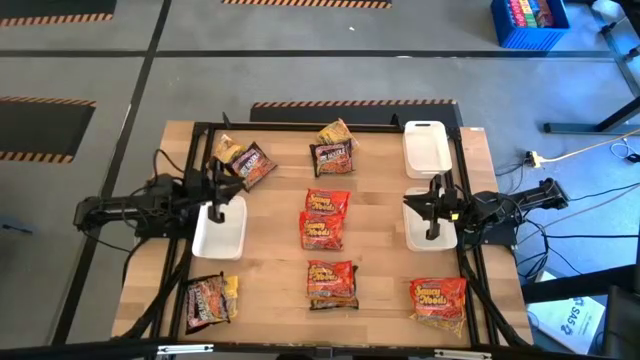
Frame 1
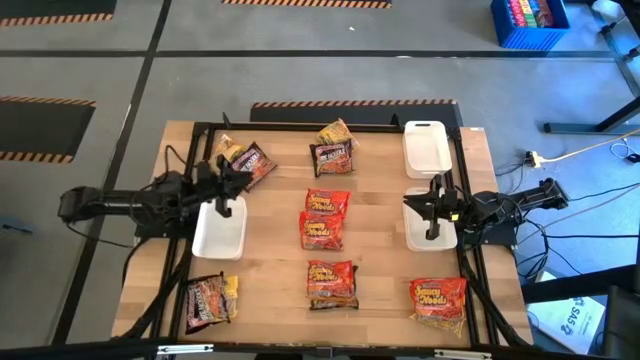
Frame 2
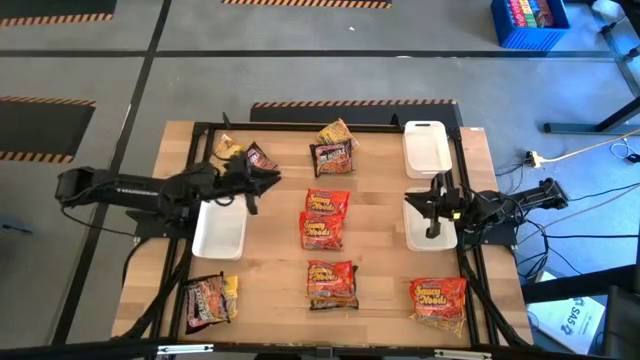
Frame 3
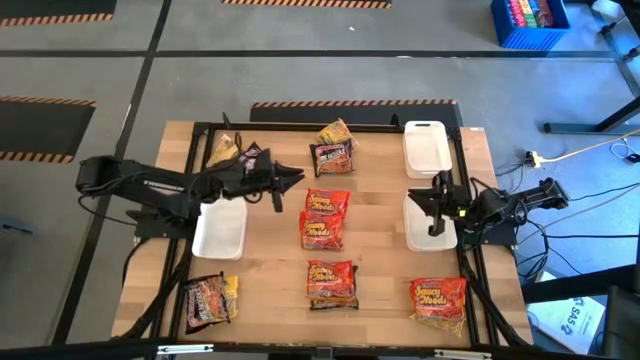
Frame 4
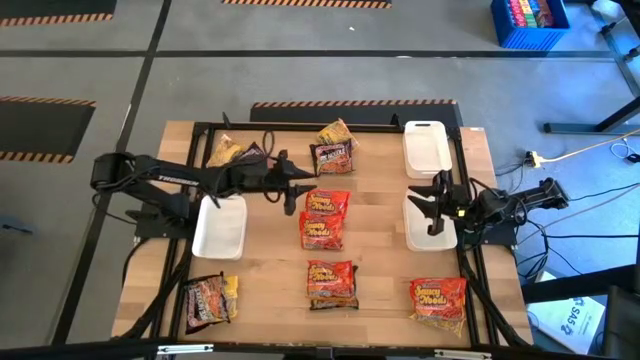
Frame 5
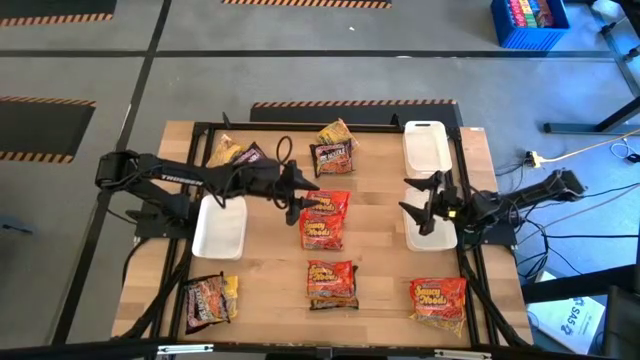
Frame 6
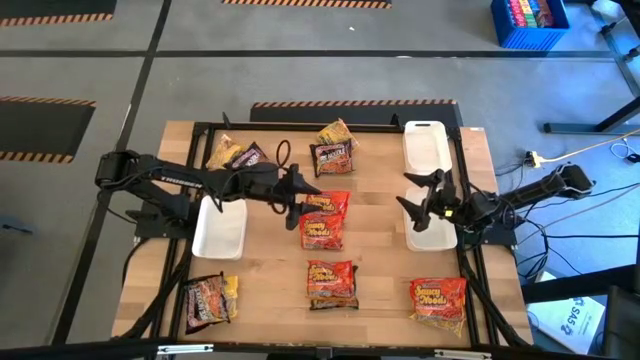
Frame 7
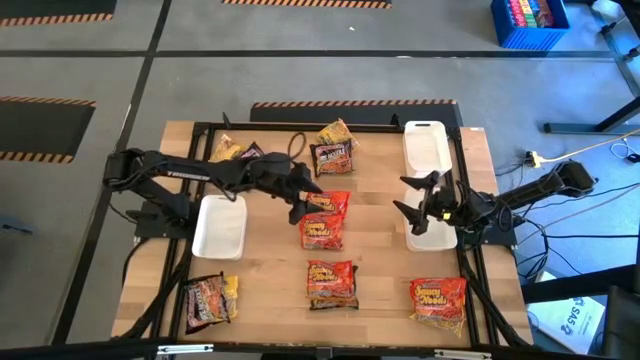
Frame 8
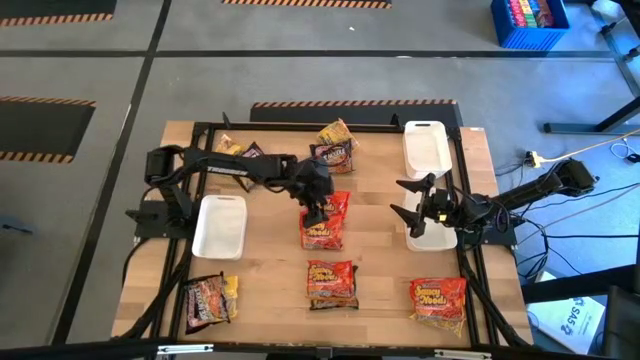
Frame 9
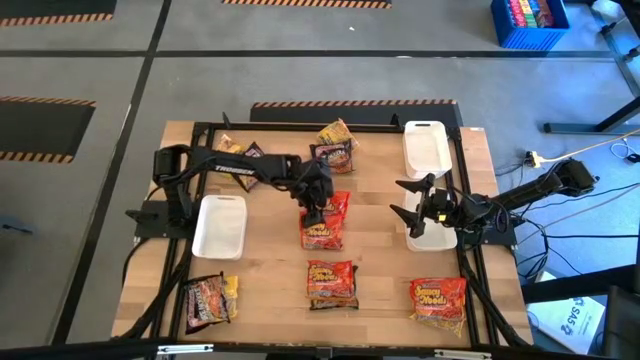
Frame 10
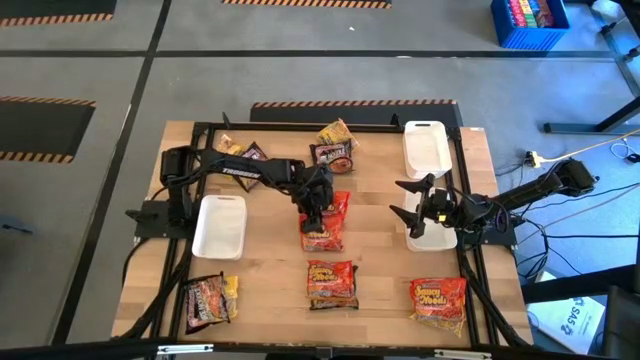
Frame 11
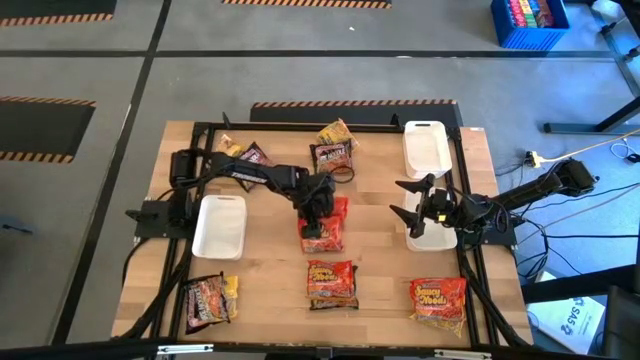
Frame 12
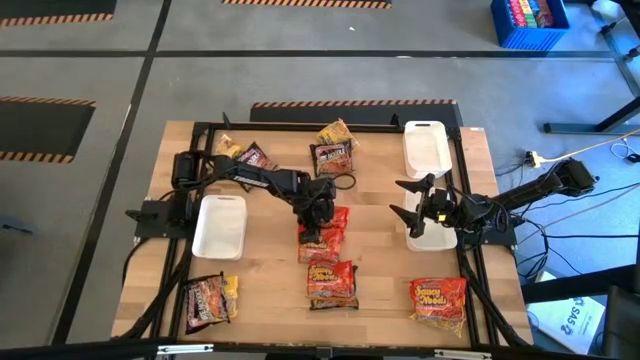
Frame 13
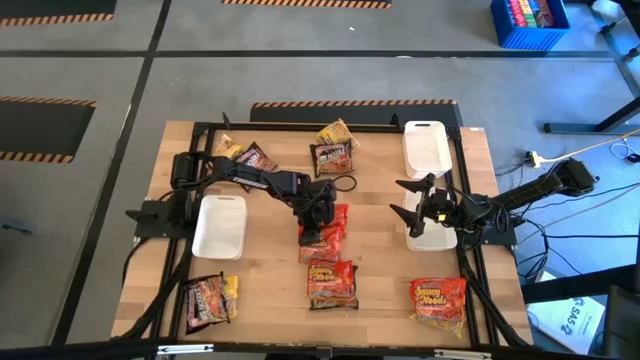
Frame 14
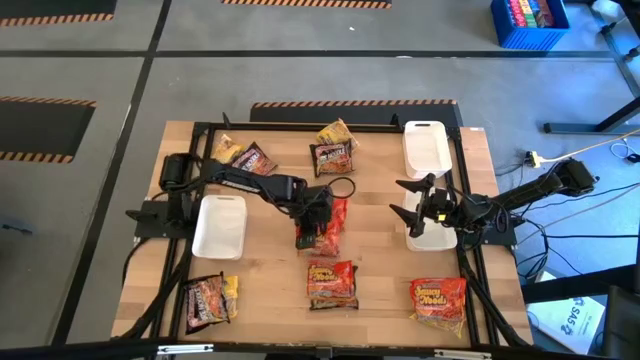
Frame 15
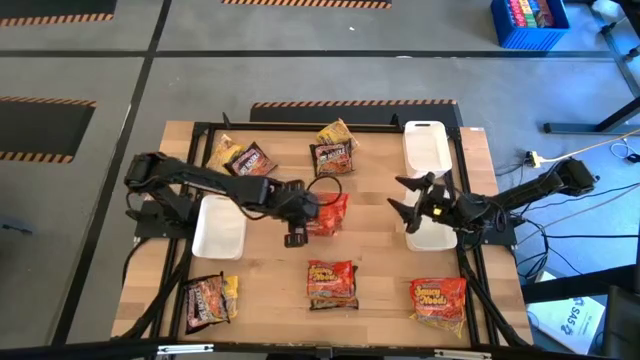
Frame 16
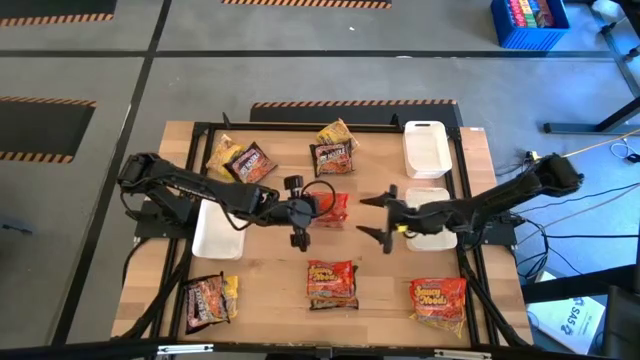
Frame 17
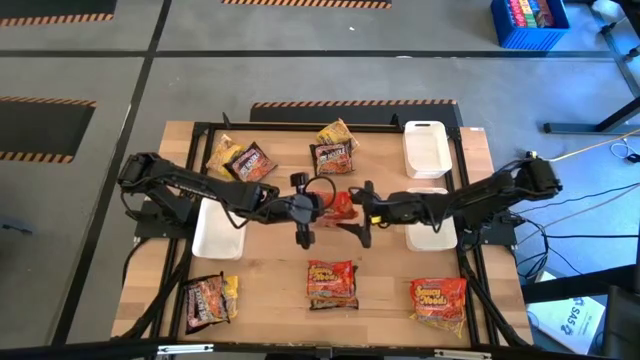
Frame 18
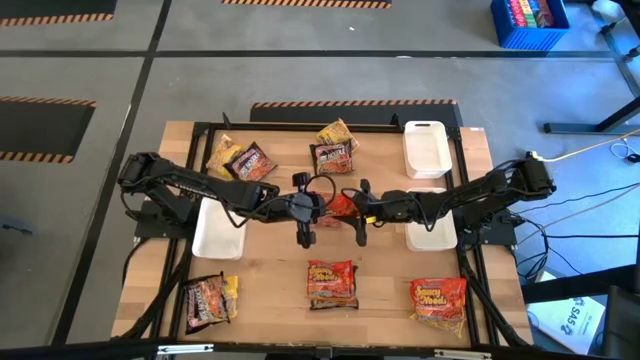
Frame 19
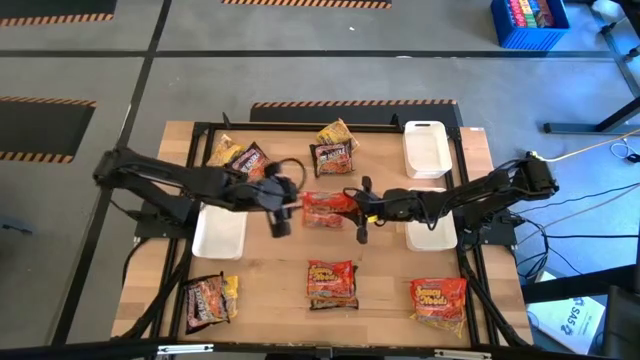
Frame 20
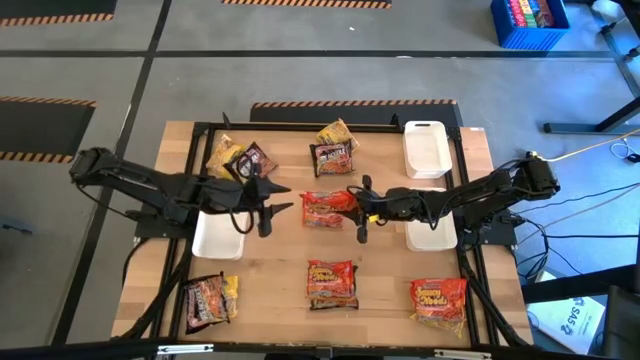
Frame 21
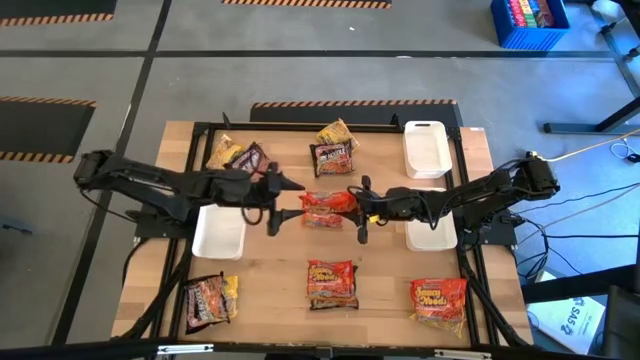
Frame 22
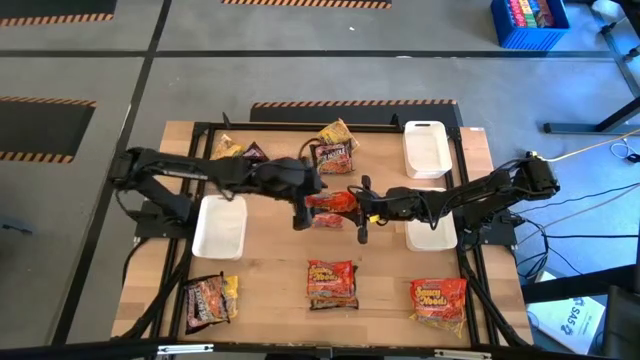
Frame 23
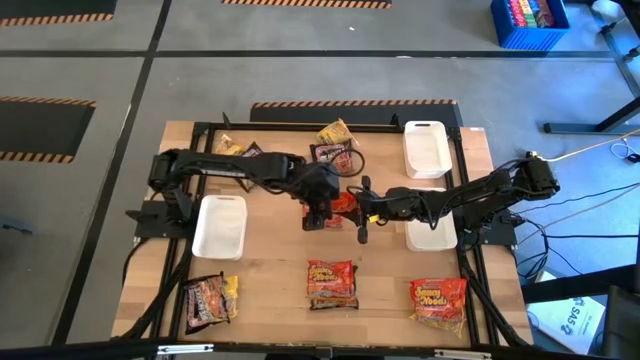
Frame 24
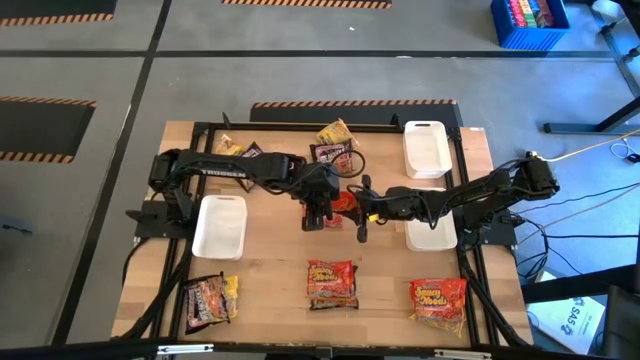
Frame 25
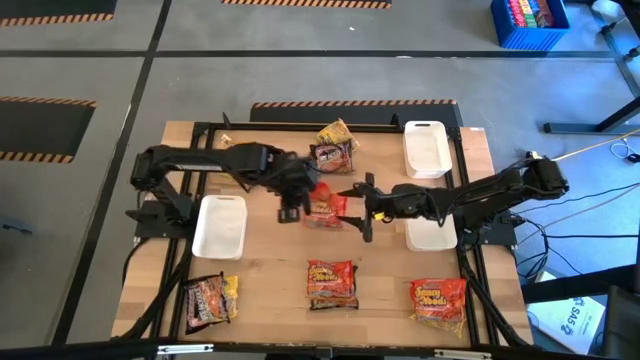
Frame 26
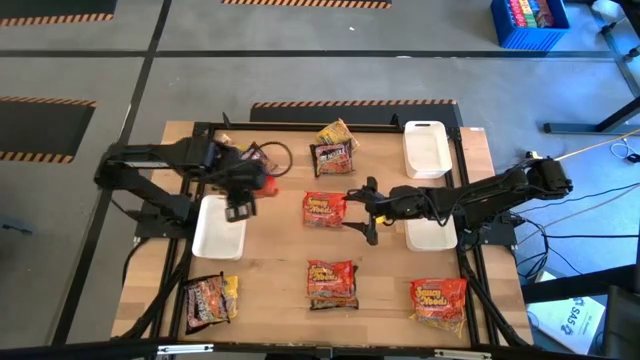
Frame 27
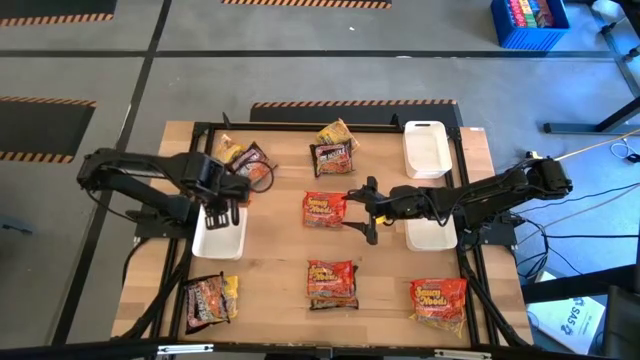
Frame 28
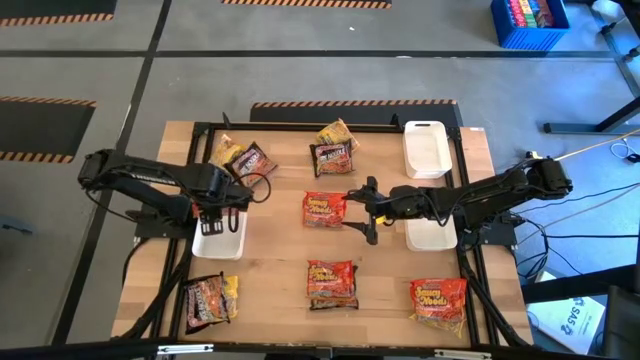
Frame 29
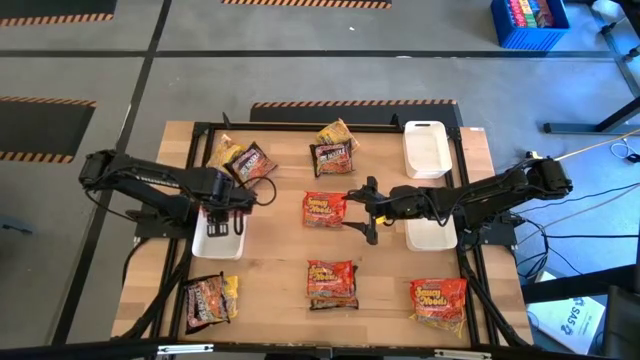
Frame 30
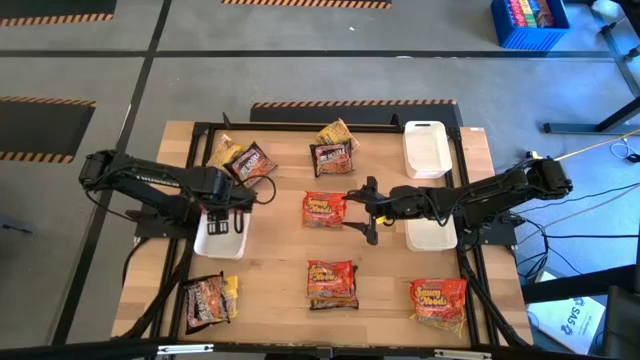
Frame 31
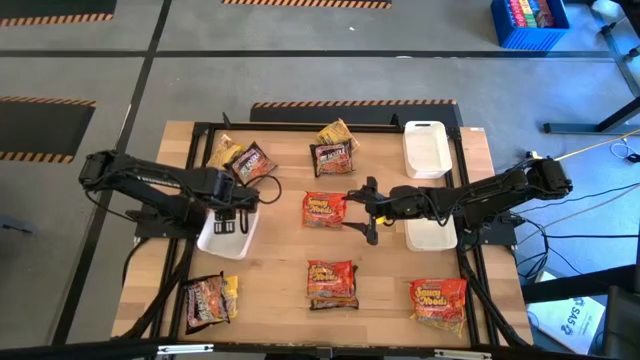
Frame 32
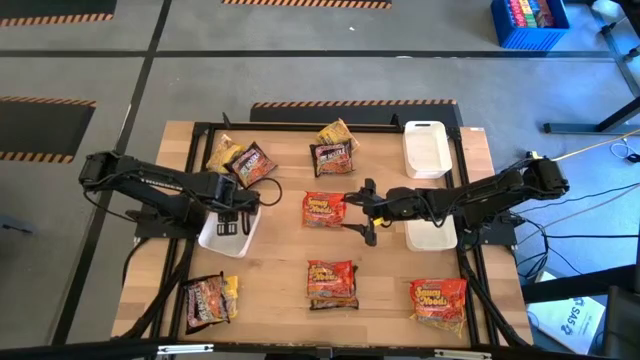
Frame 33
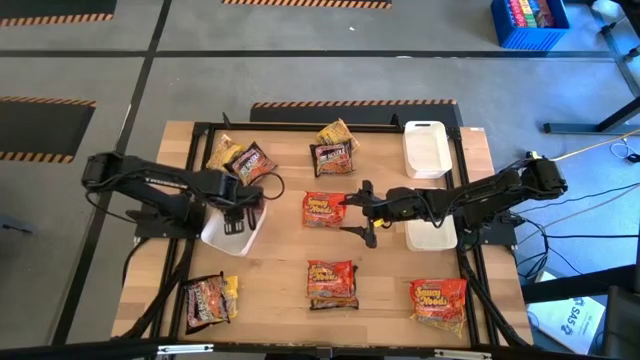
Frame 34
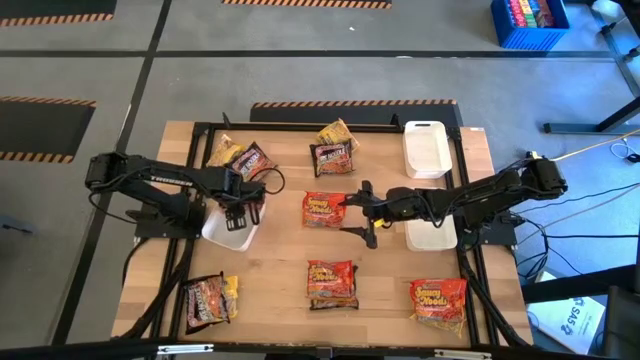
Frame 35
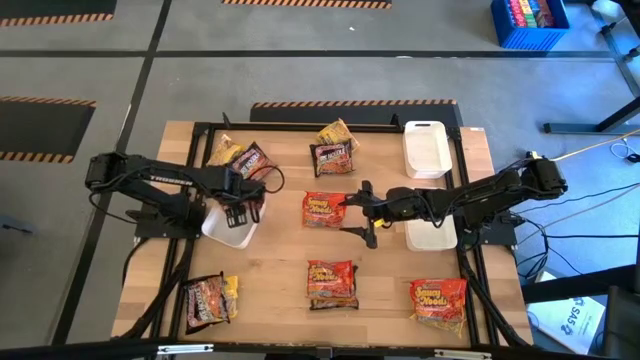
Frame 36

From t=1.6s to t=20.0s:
Task: Sort Maruchan noodles
Put the middle orange noodle into the left white bin
